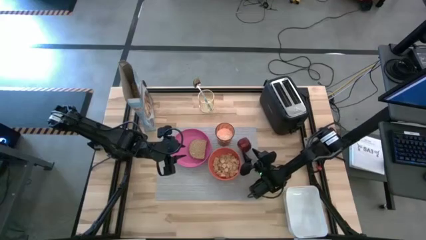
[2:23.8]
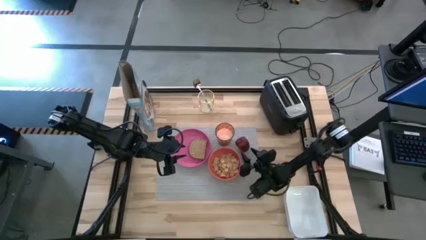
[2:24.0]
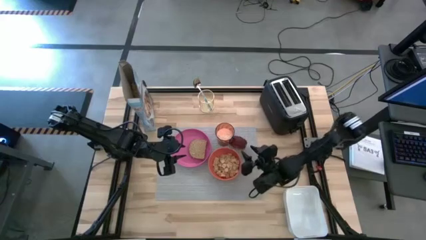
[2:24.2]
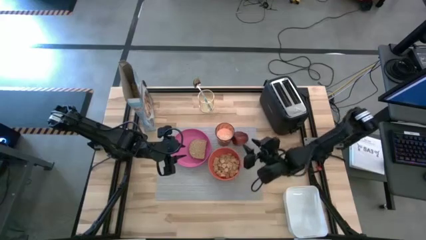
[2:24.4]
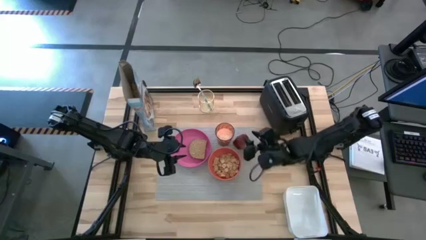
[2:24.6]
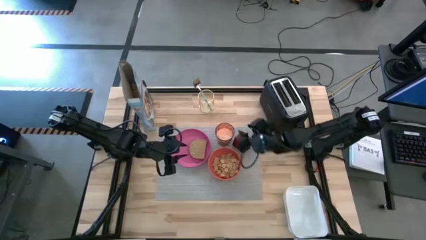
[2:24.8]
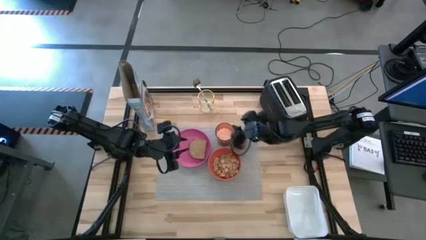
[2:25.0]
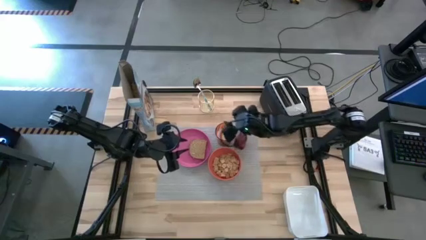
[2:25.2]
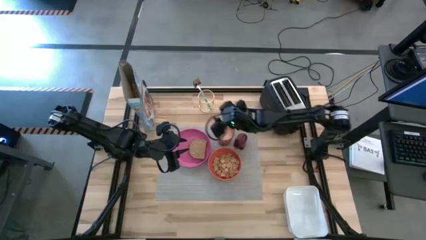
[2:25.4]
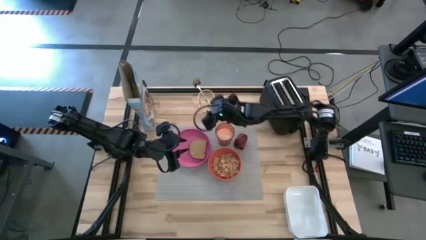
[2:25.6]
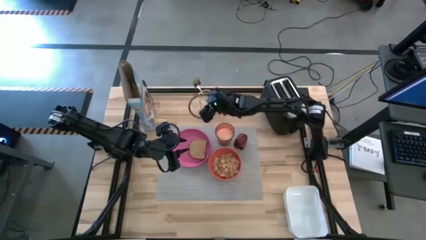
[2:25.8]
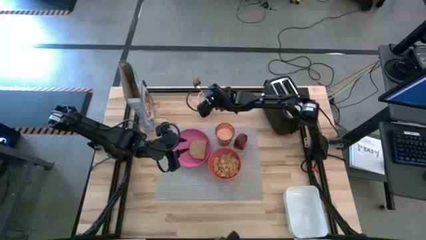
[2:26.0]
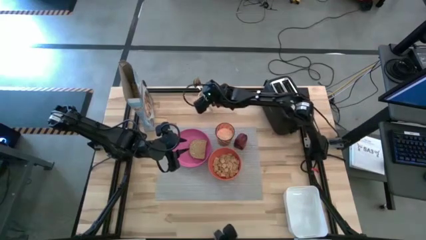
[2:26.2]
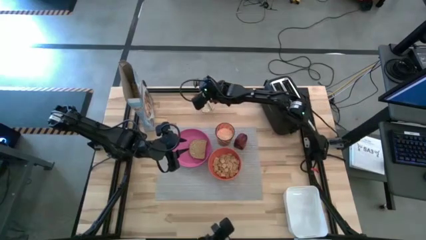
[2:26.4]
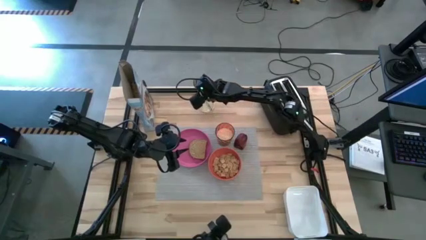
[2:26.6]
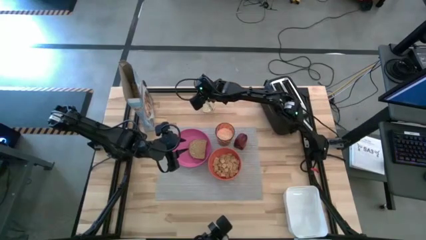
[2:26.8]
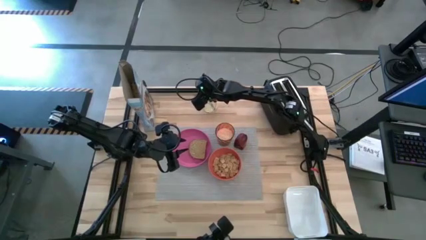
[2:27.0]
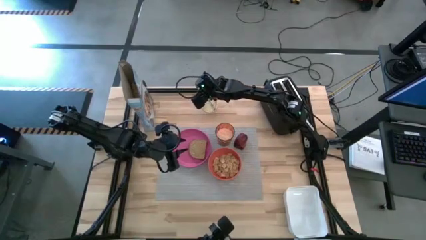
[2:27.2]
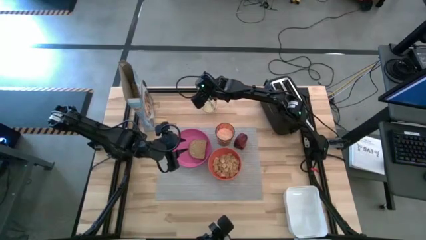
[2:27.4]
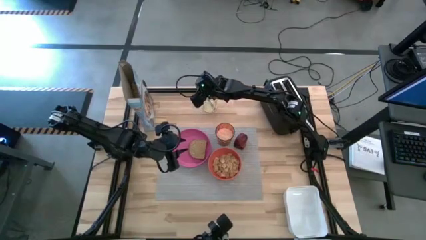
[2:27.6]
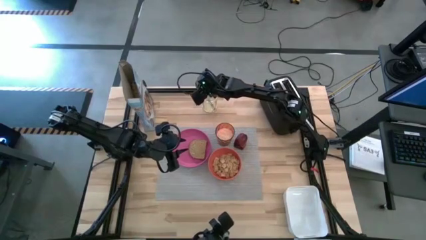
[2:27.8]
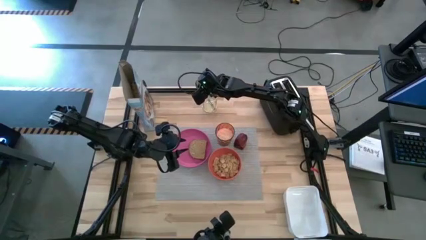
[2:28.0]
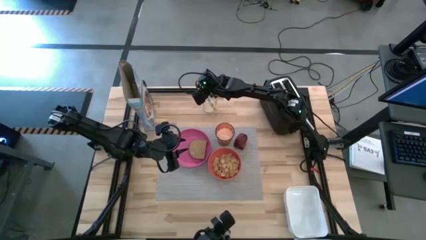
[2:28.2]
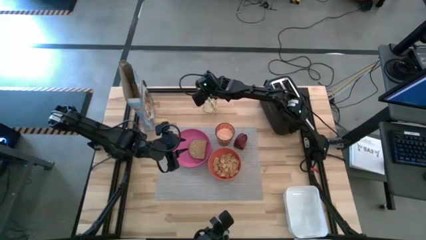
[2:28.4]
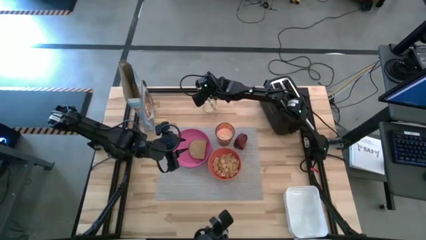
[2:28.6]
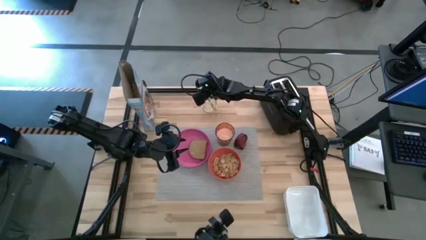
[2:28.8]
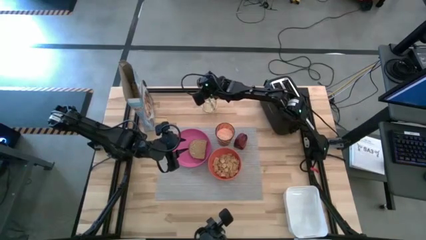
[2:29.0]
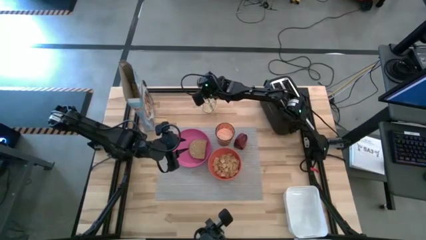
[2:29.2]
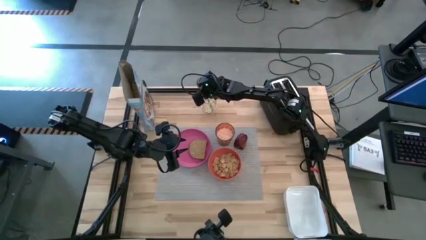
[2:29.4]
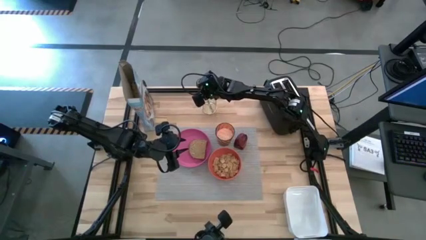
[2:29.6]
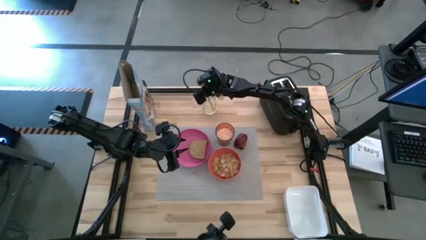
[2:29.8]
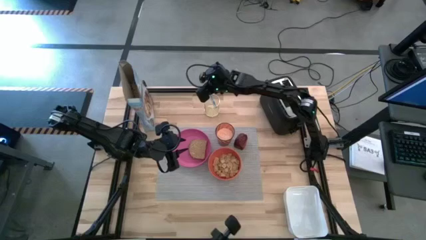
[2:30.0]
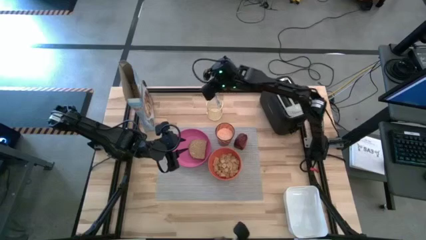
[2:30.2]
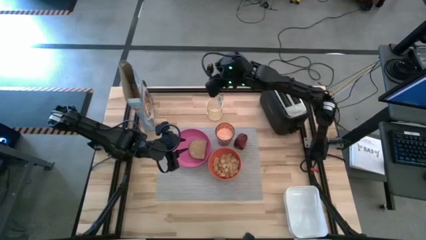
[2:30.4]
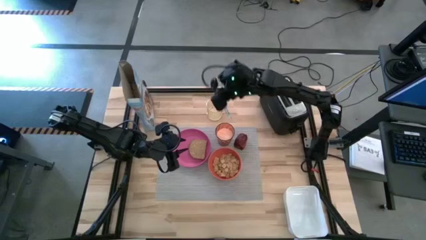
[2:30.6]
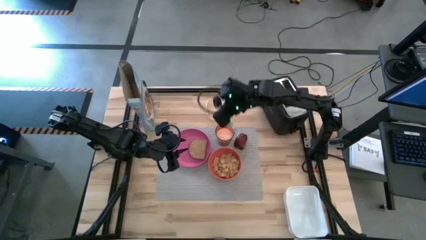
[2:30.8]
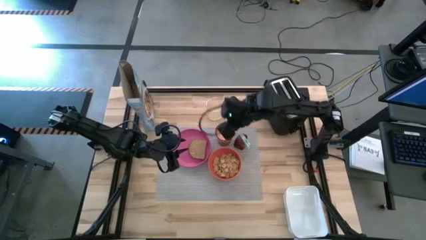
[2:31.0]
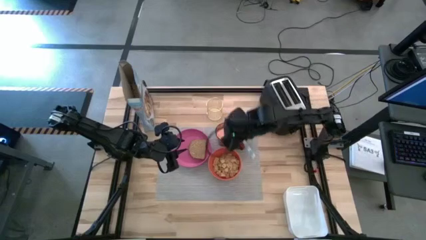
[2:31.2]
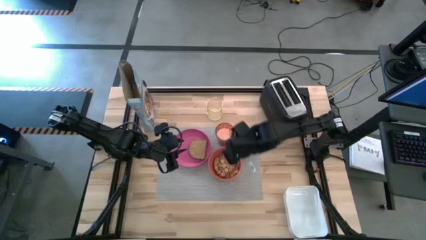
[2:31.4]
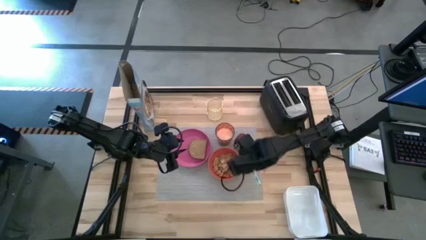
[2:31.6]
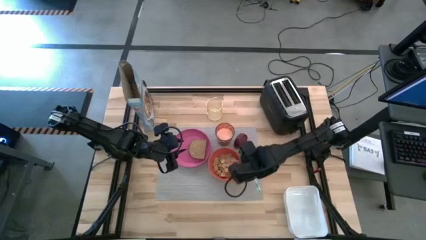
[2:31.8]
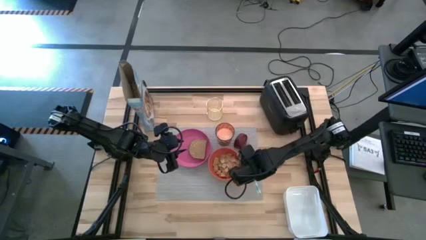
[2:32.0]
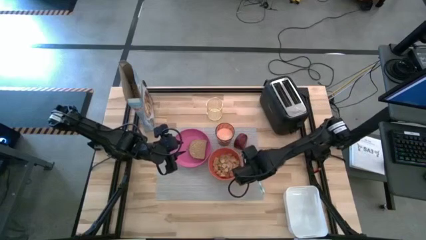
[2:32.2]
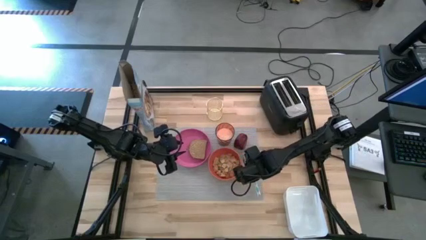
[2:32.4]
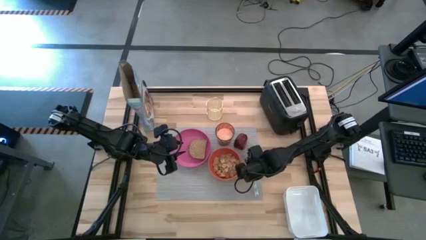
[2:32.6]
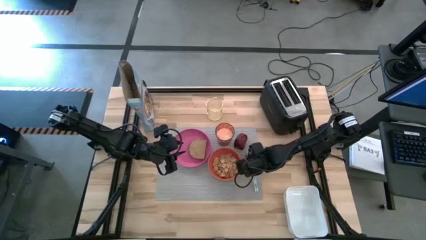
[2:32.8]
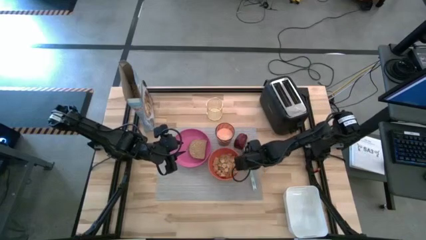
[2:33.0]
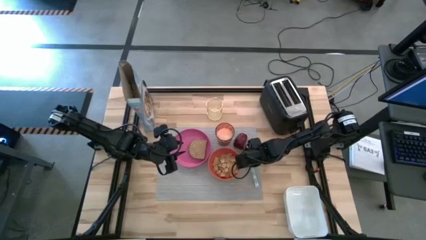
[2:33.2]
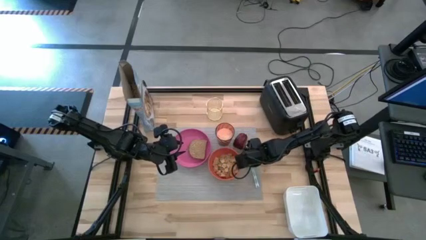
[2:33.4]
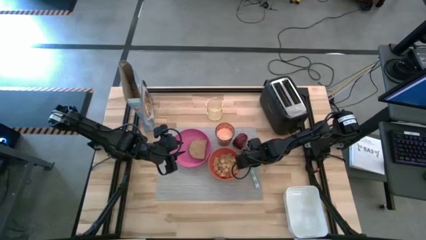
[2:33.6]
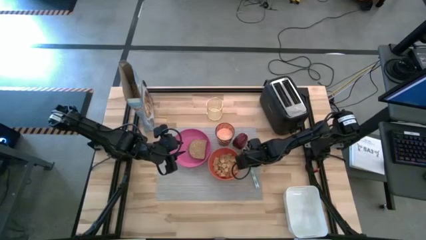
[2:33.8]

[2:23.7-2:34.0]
Task: Arrange a breakfast setting
Put the white patterned spoon on the gray table mat to the right of the orange bowl

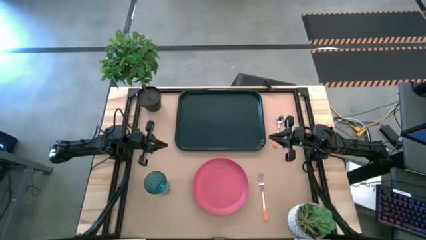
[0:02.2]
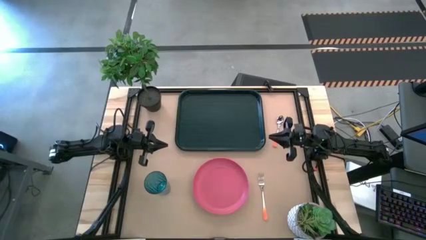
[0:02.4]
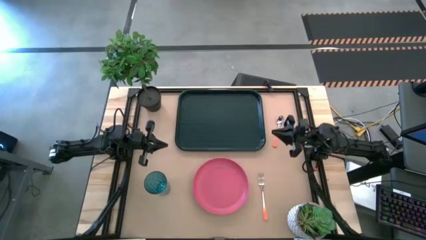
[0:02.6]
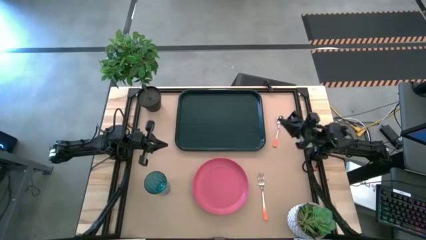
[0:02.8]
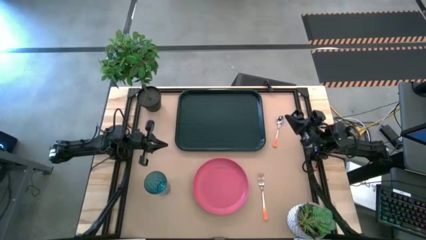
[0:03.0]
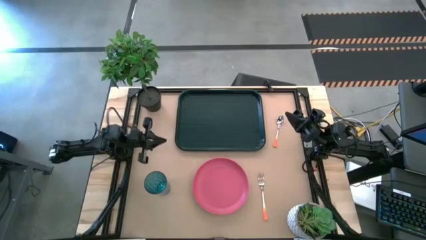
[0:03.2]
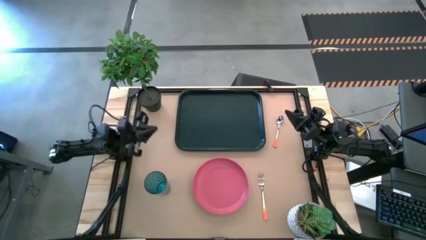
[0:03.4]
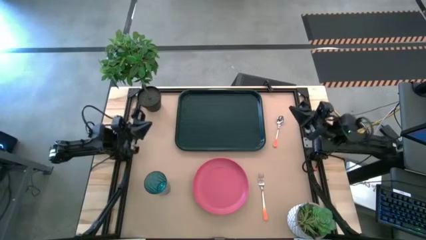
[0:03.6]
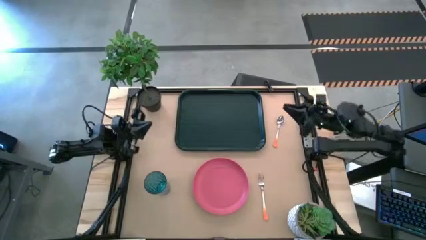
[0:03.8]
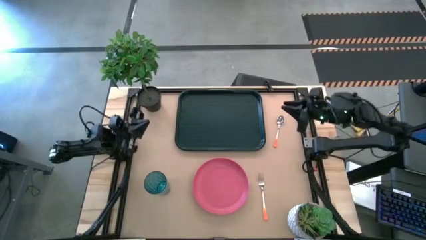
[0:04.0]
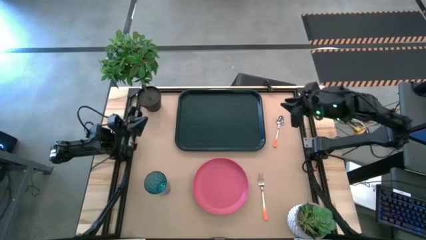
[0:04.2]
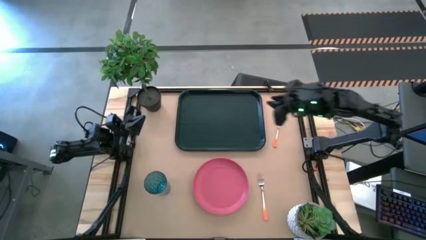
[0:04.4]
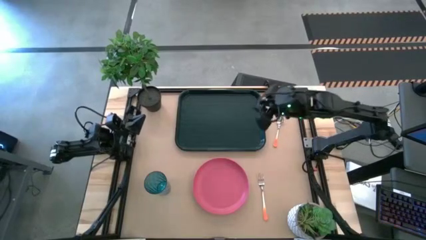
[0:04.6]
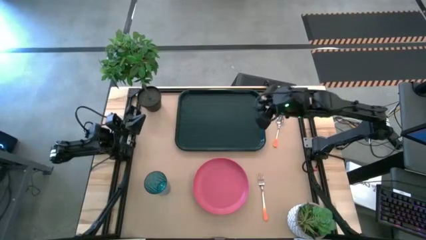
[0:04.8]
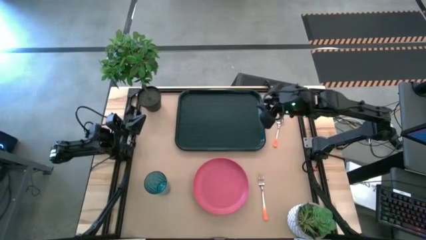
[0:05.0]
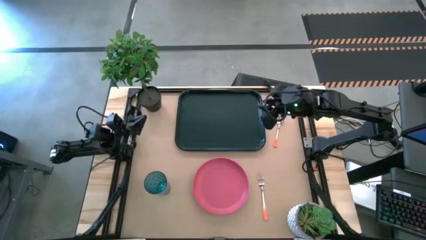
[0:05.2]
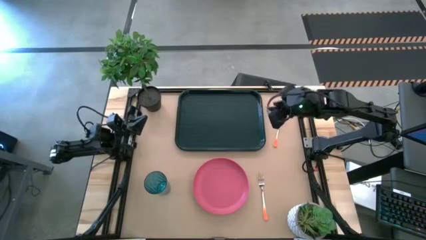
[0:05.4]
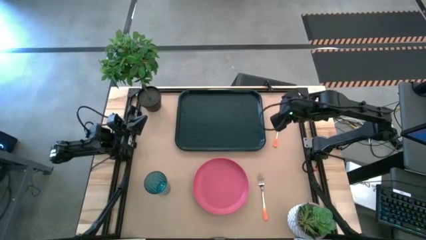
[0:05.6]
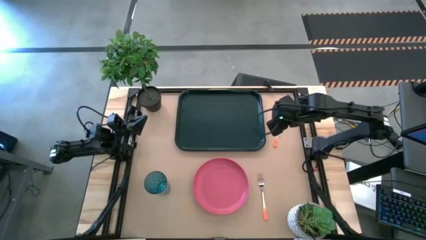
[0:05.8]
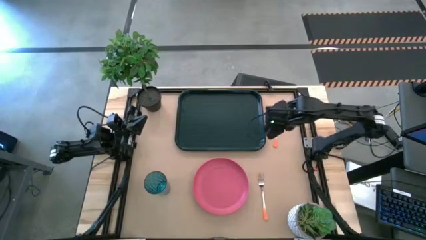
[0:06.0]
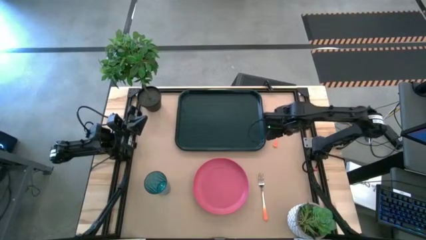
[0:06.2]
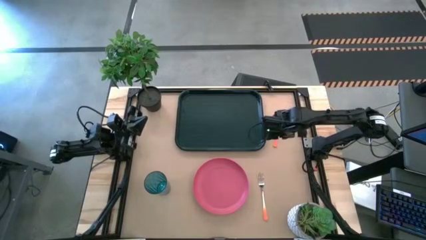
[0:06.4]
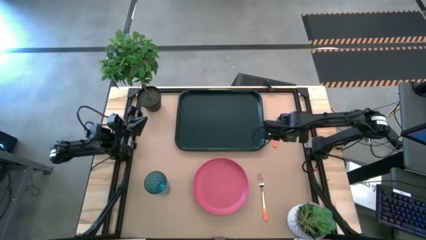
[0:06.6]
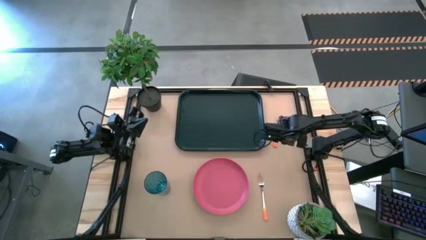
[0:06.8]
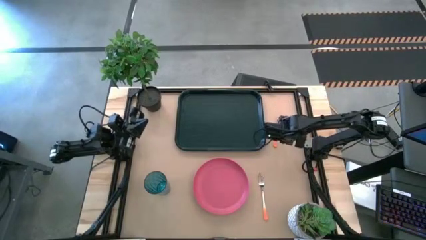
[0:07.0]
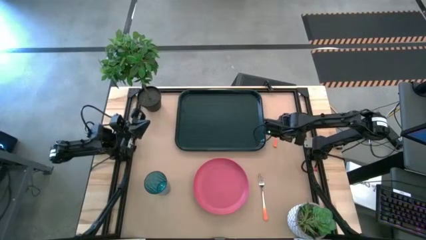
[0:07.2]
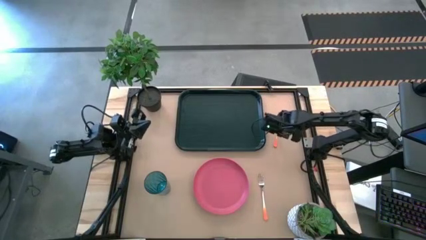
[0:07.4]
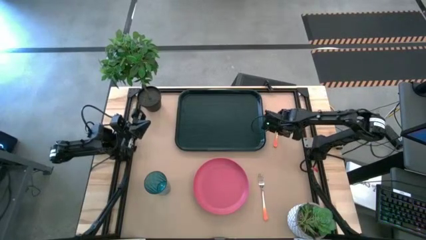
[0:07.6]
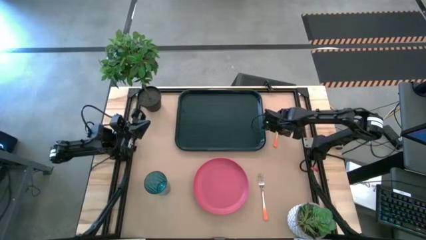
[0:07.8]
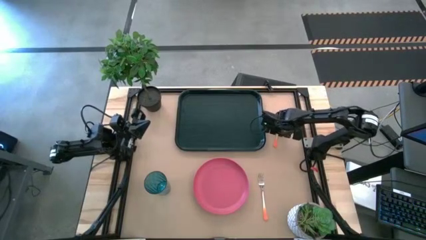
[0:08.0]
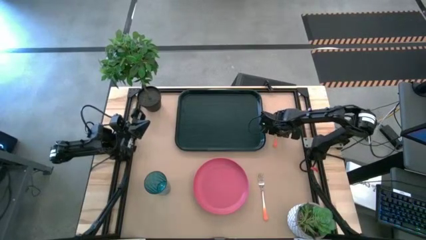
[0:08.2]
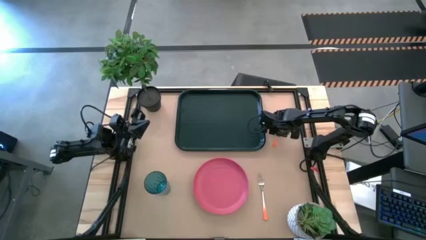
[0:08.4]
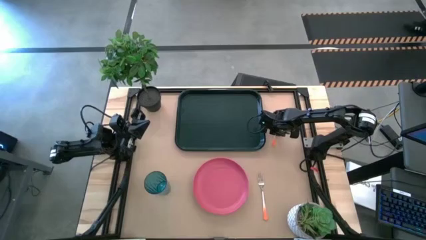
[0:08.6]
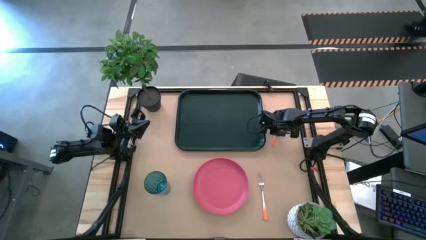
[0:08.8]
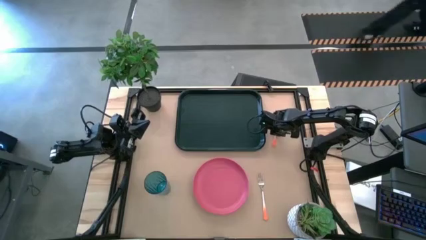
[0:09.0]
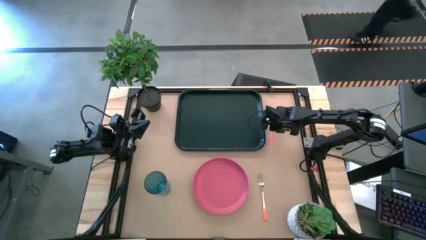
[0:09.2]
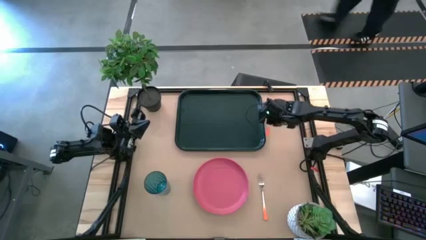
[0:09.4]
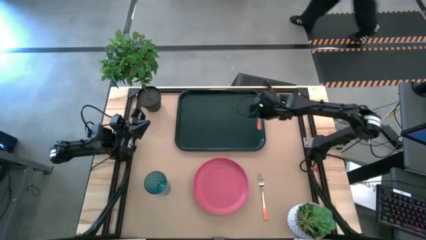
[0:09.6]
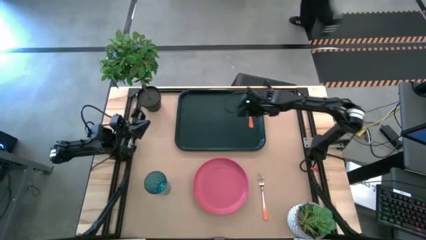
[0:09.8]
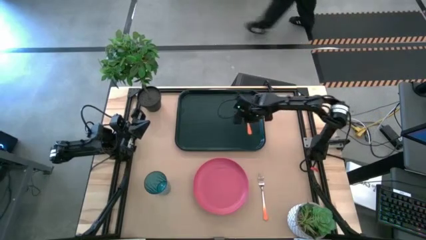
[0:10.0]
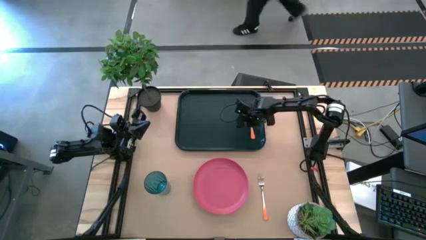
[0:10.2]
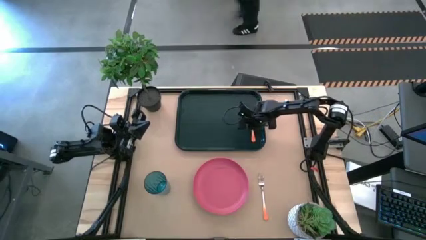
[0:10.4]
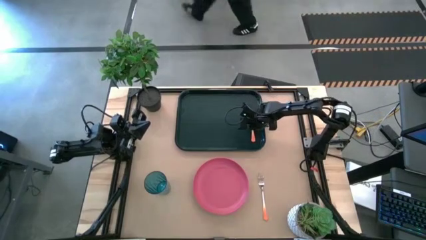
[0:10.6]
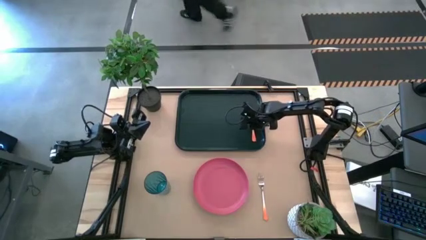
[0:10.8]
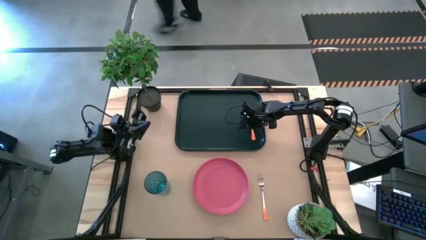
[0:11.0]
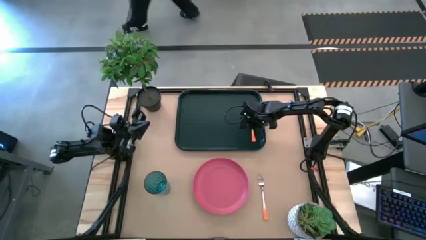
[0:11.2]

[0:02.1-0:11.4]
Task: Pick and place plate/cup/fork/spoon on tray
Put the orange spoon on the green tray
